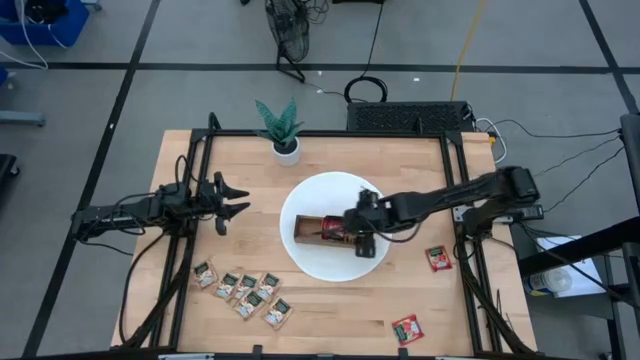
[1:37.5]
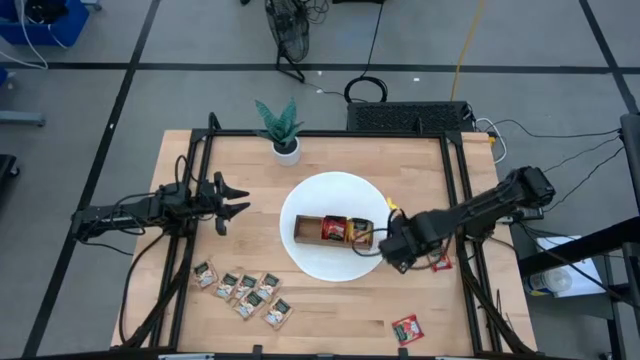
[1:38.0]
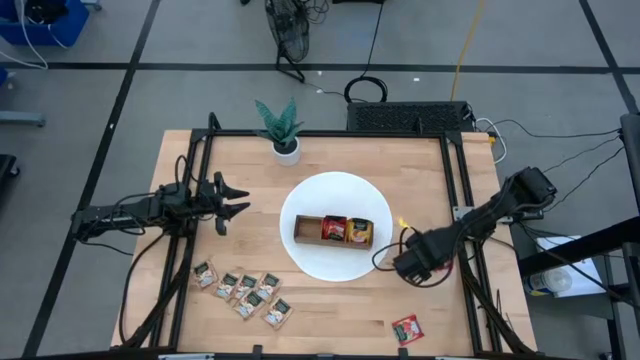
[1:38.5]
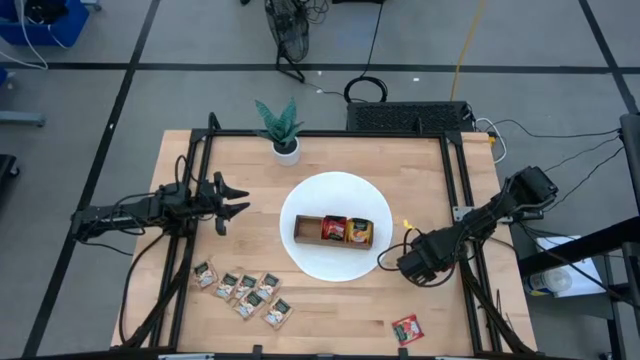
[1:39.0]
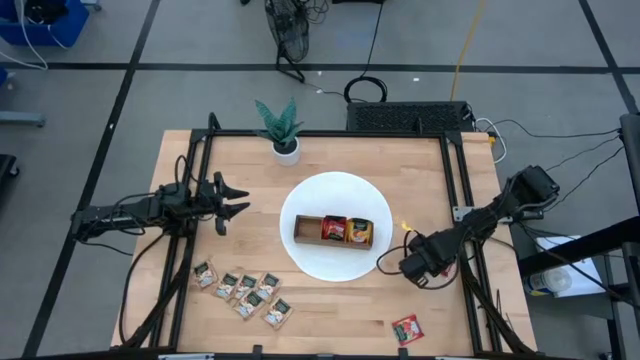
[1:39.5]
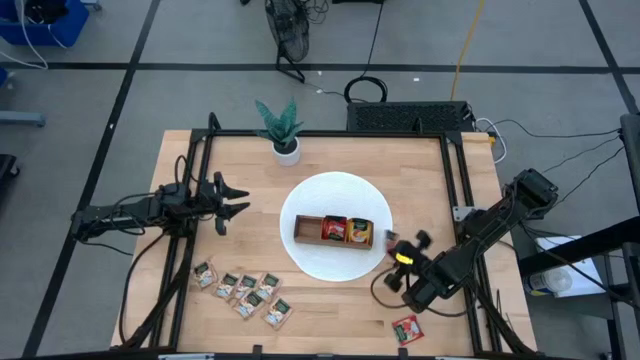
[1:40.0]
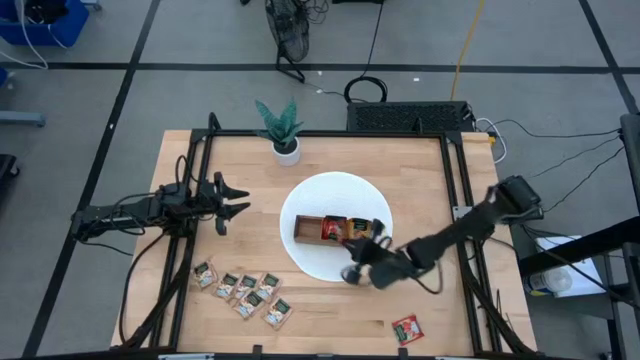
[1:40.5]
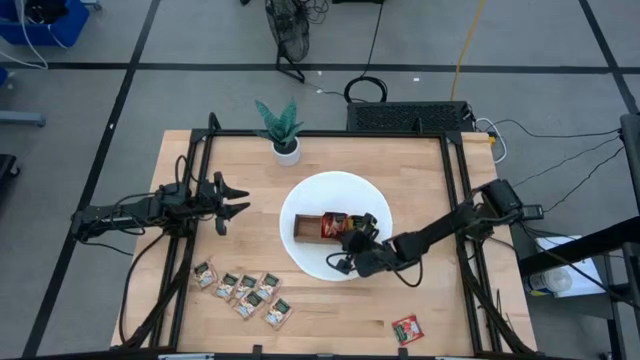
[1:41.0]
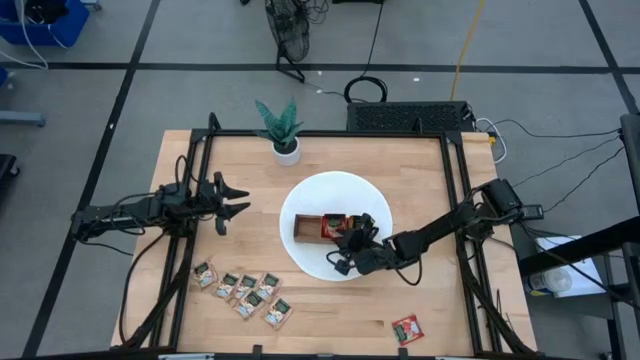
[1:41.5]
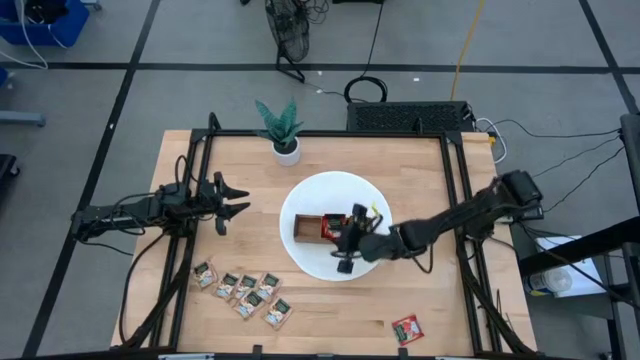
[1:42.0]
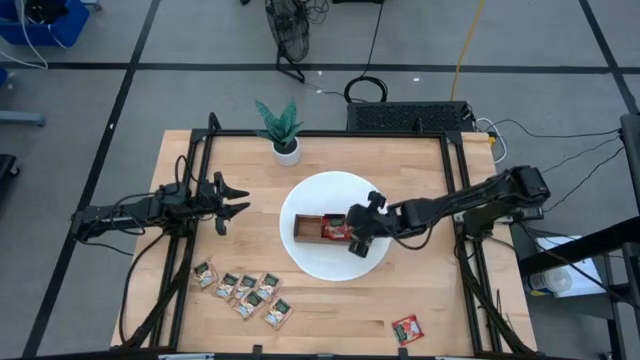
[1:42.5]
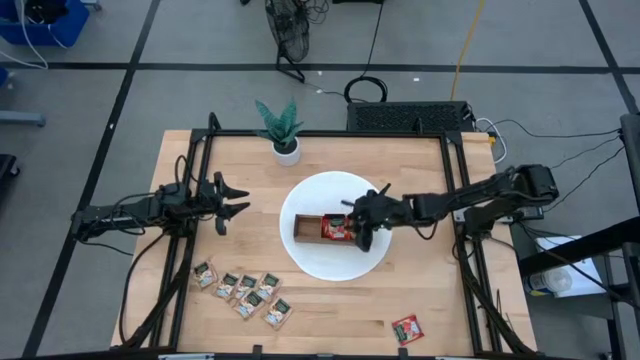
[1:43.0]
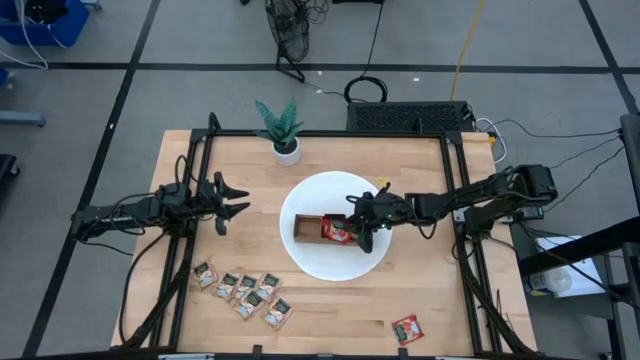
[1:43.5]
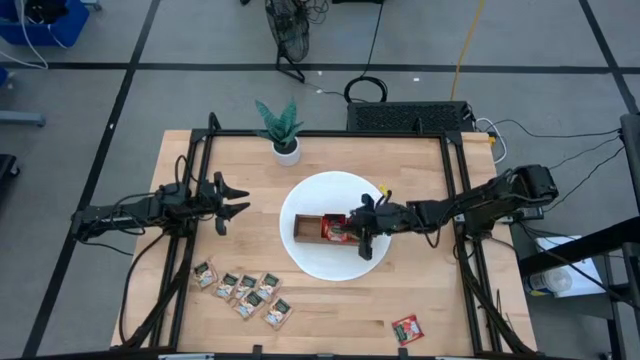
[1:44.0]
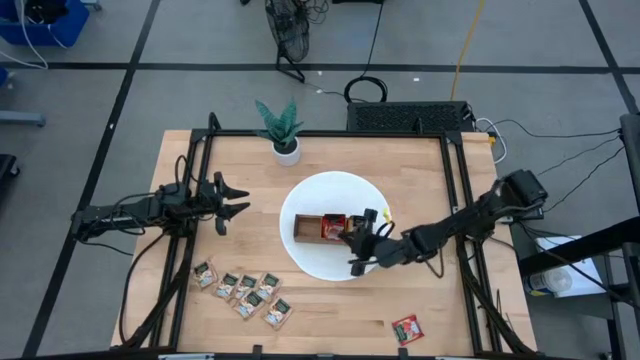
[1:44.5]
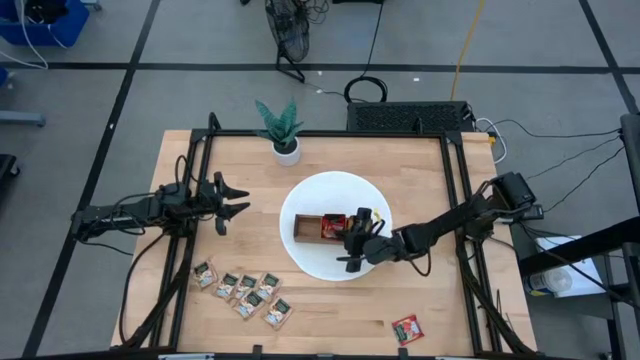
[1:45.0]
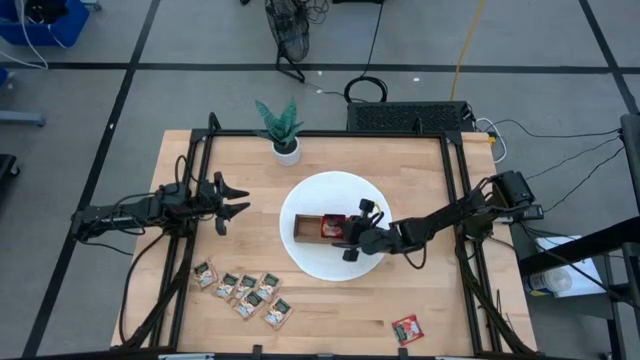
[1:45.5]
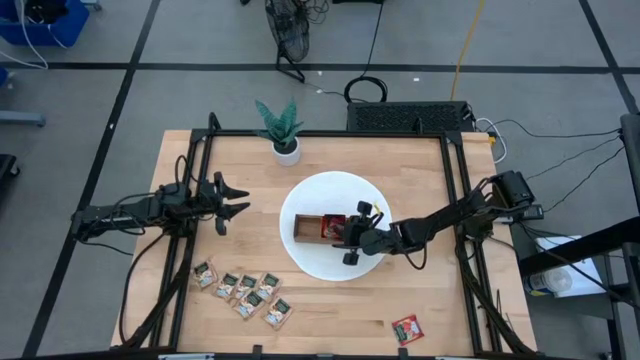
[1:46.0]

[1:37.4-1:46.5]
Task: Pick & Place Tea
Put the red tea bag into the middle section of the wooden organizer

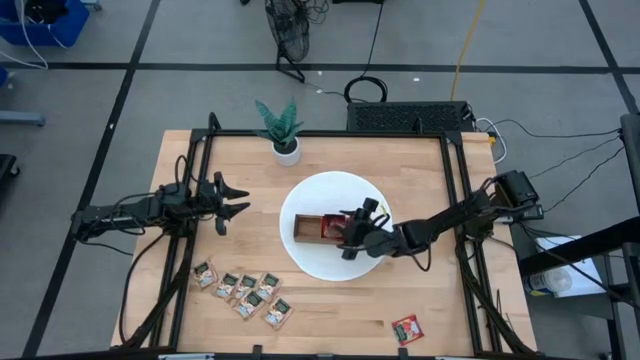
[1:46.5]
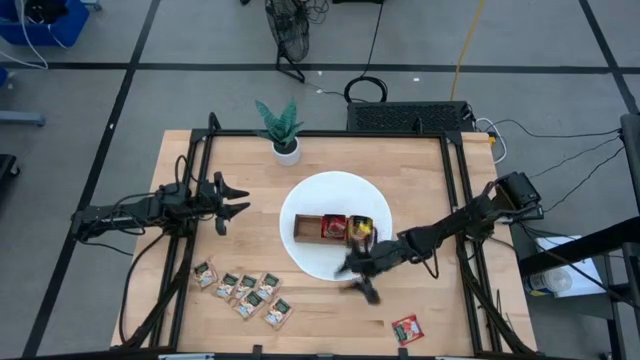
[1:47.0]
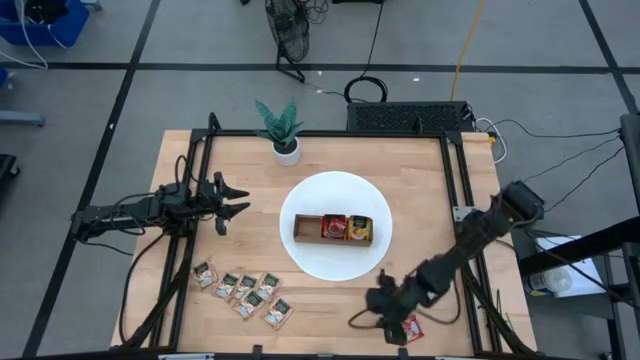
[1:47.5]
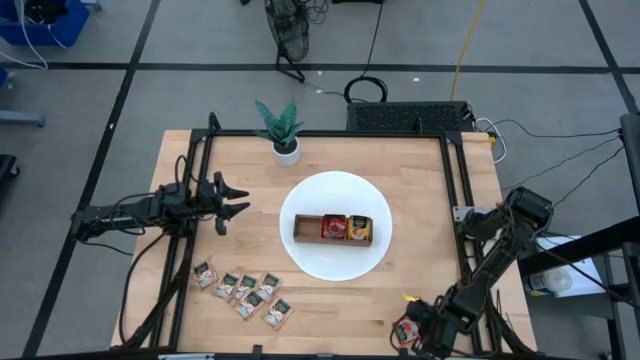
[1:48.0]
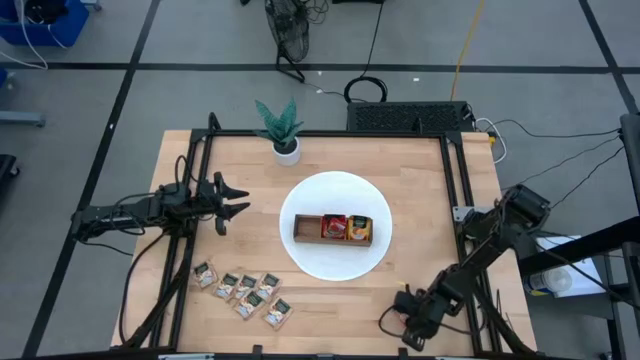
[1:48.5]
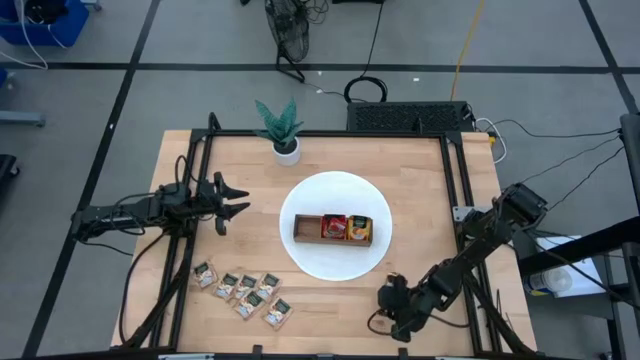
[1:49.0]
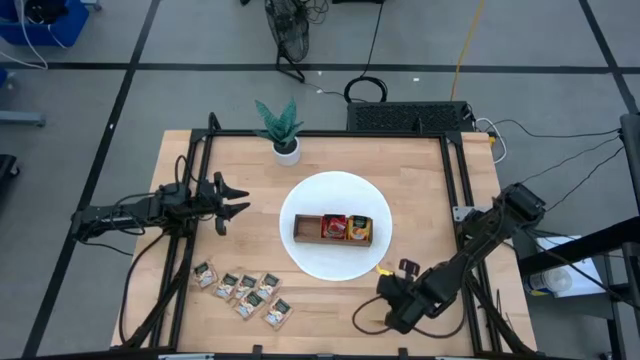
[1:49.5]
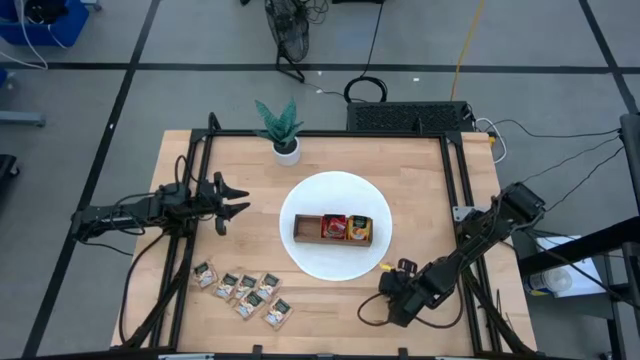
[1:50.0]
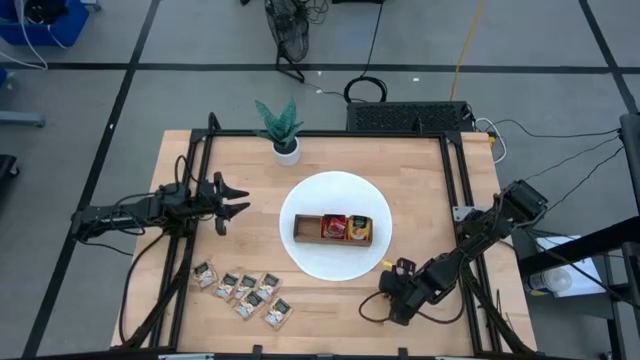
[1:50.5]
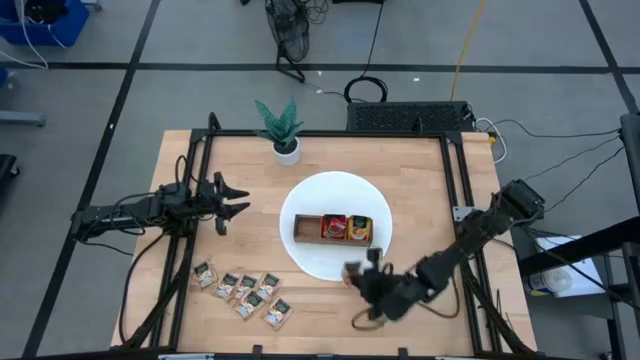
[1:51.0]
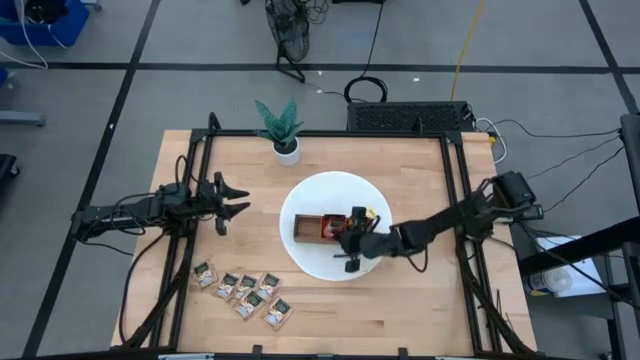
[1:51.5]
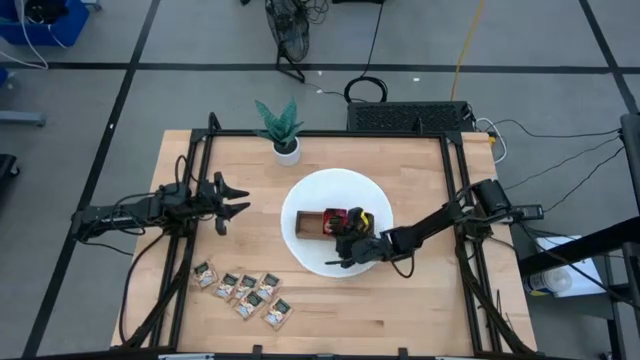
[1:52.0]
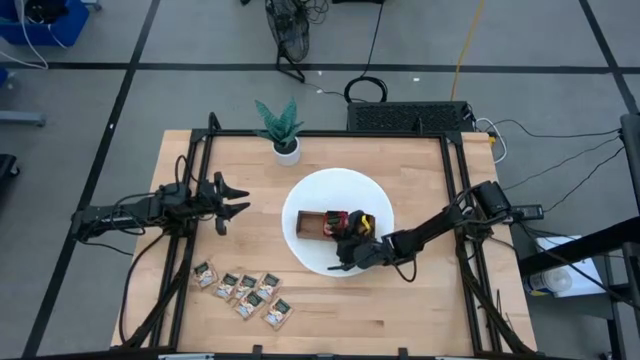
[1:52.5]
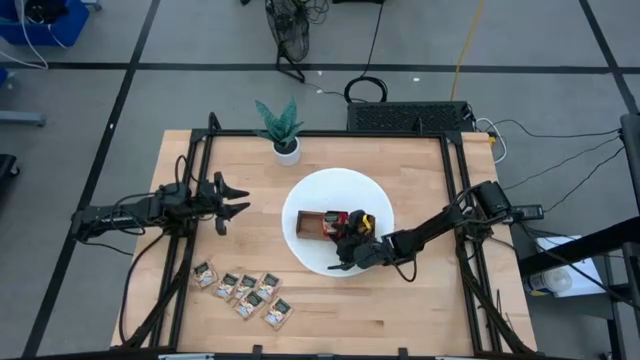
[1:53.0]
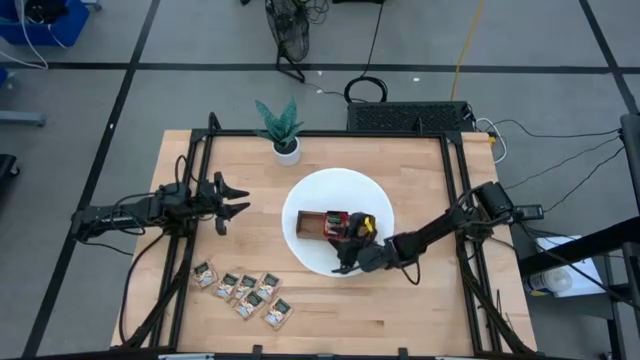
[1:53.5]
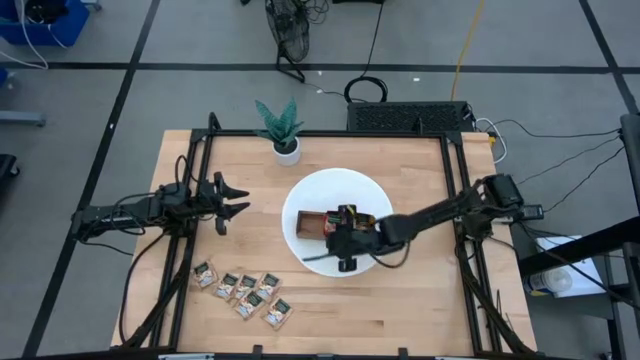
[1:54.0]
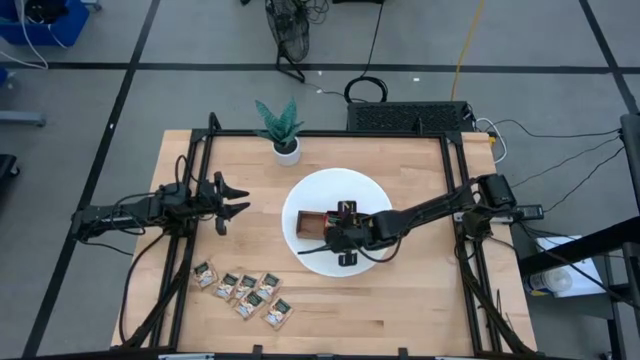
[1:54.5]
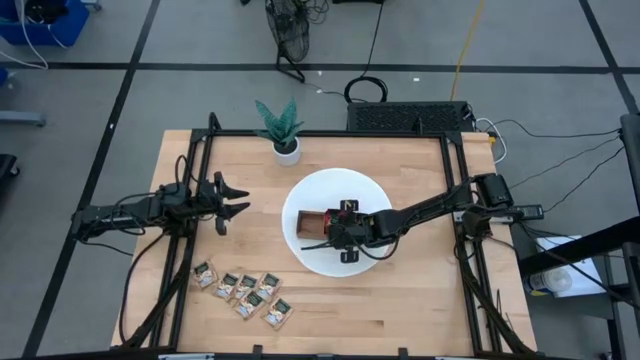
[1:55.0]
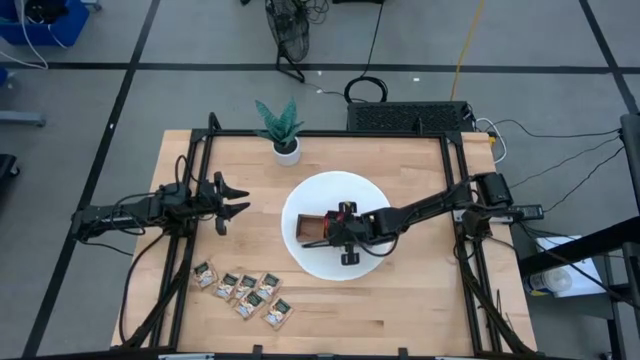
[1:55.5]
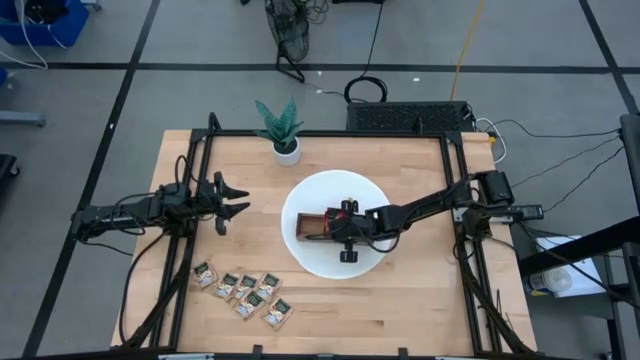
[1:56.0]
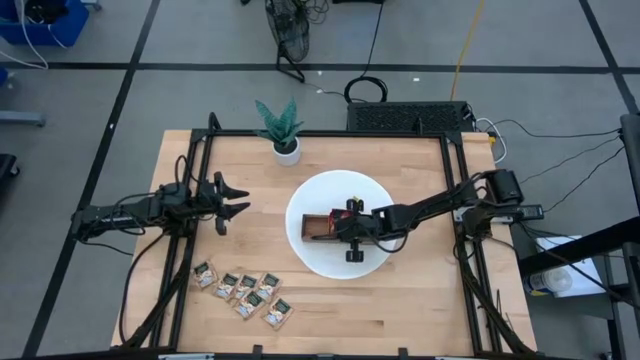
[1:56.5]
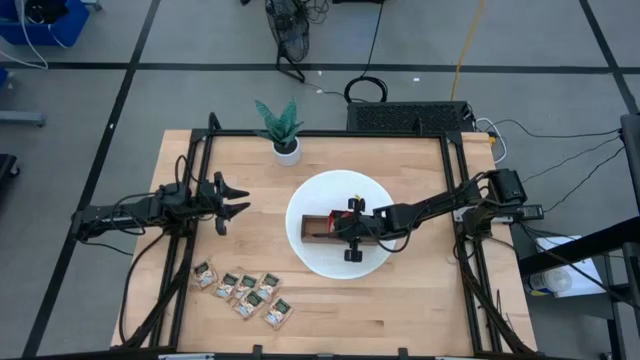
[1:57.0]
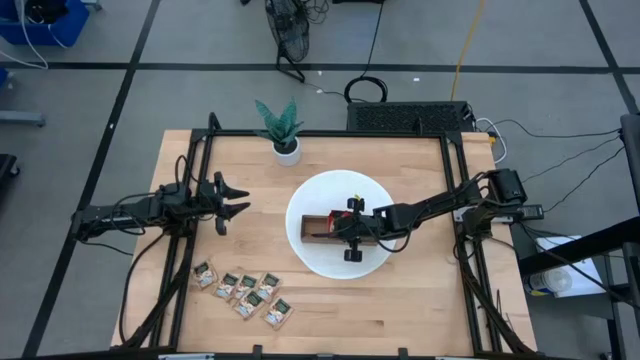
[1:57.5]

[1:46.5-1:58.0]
Put the red tea bag into the middle section of the wooden organizer
